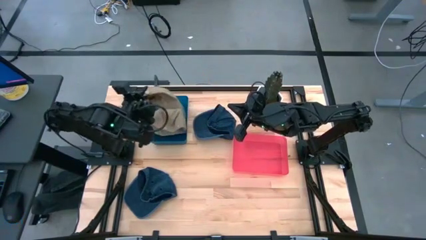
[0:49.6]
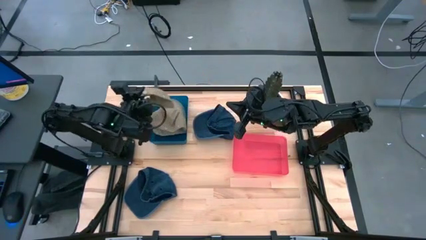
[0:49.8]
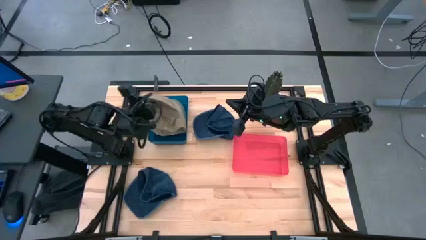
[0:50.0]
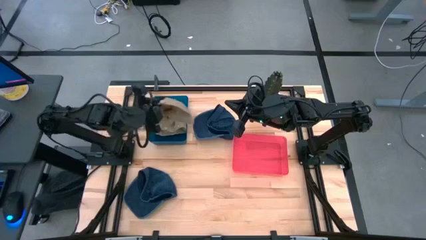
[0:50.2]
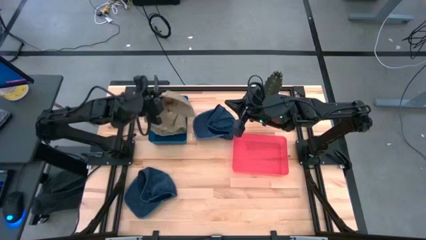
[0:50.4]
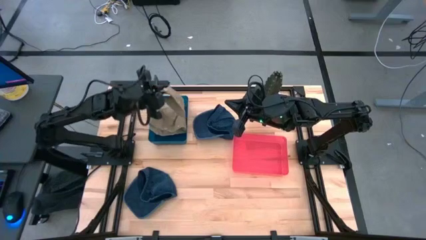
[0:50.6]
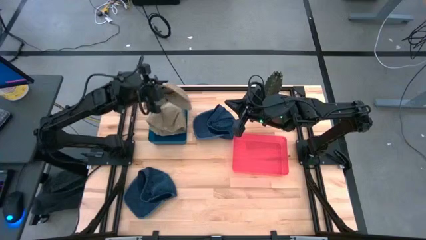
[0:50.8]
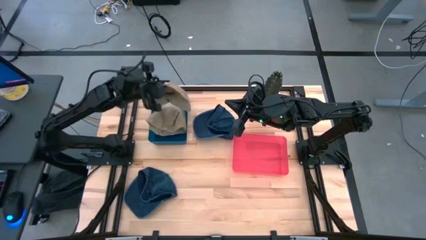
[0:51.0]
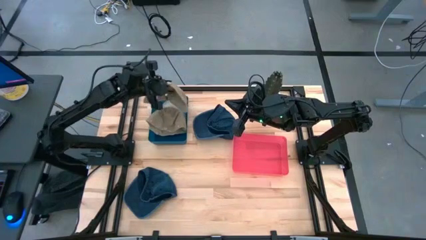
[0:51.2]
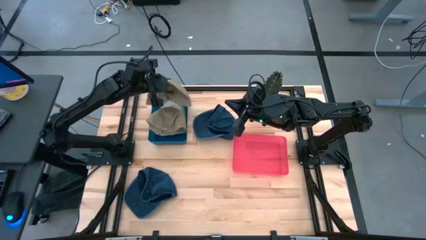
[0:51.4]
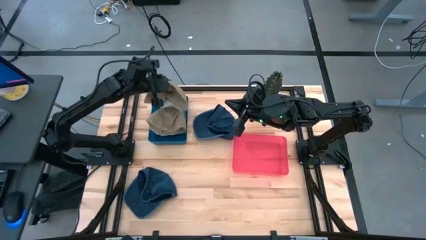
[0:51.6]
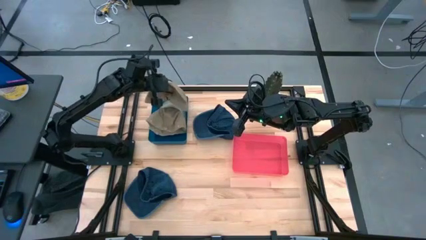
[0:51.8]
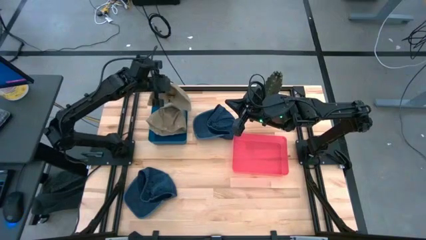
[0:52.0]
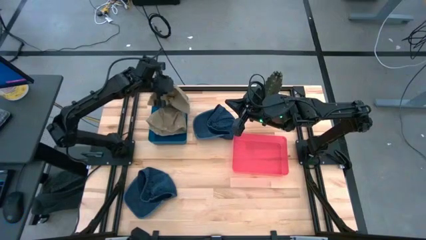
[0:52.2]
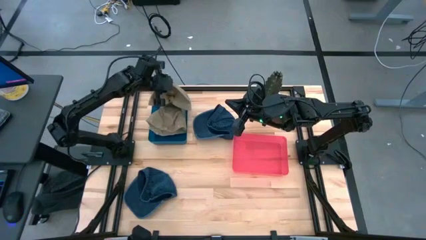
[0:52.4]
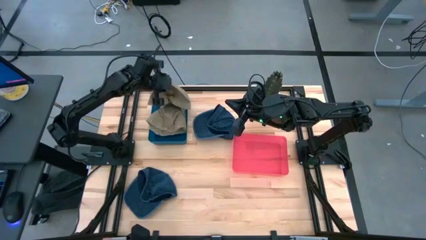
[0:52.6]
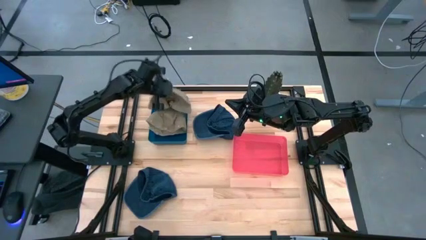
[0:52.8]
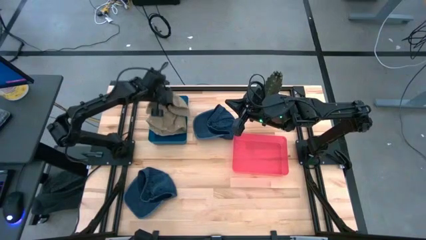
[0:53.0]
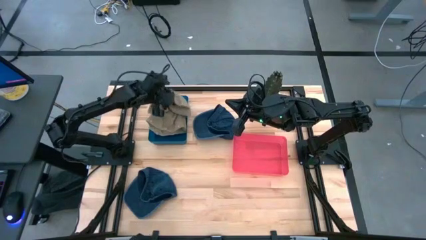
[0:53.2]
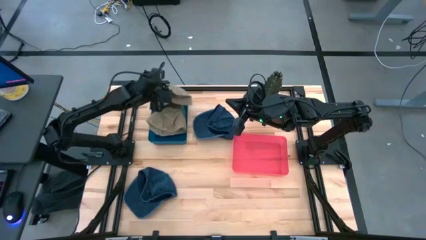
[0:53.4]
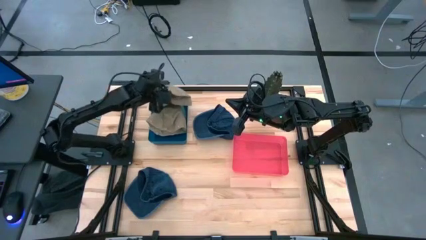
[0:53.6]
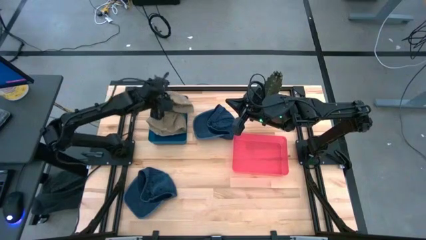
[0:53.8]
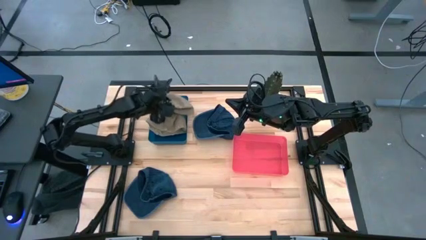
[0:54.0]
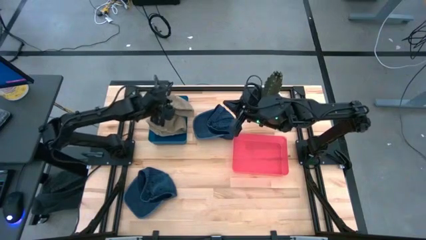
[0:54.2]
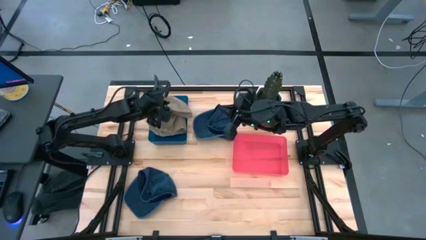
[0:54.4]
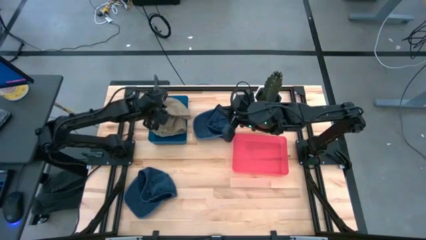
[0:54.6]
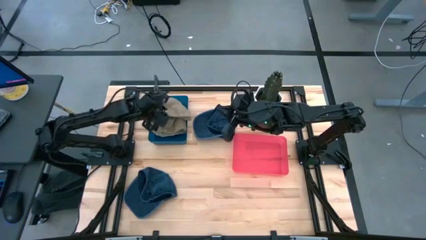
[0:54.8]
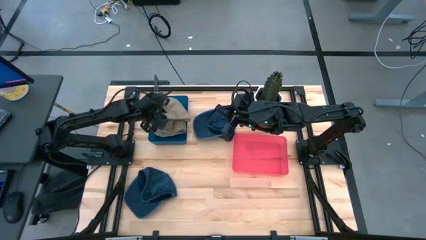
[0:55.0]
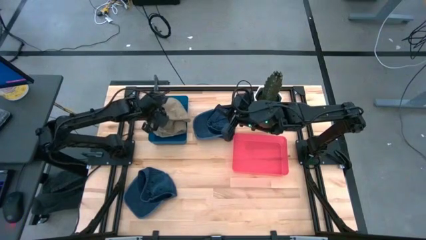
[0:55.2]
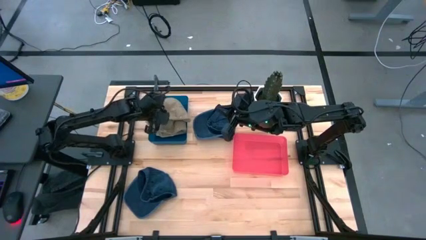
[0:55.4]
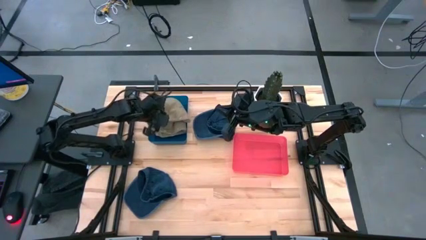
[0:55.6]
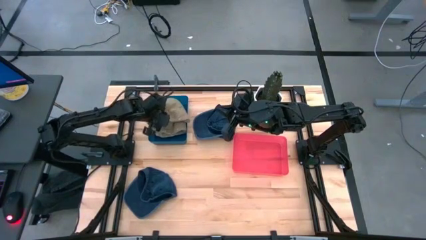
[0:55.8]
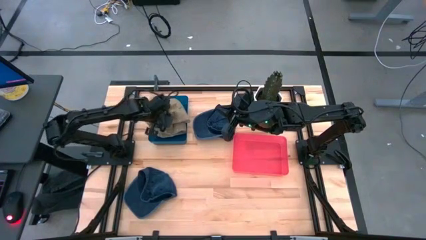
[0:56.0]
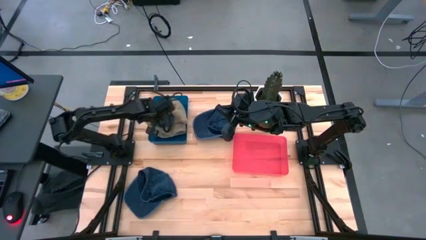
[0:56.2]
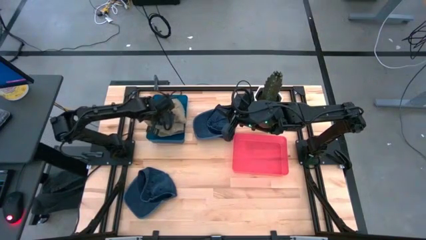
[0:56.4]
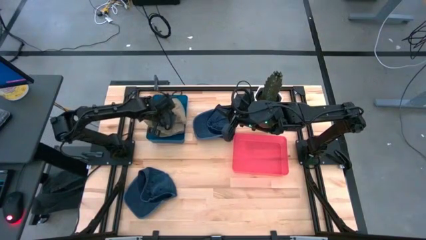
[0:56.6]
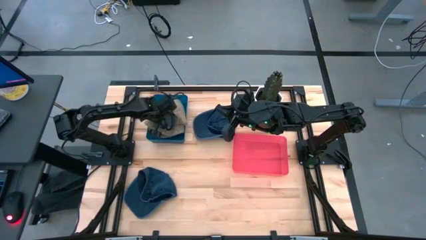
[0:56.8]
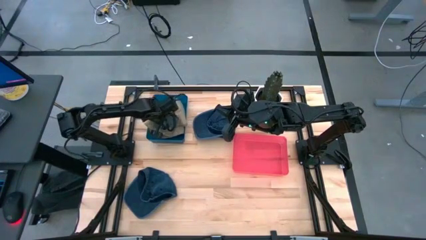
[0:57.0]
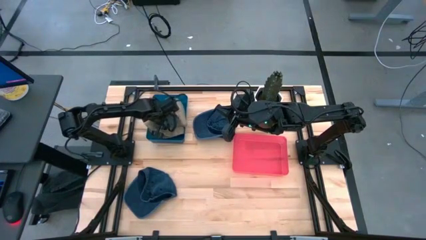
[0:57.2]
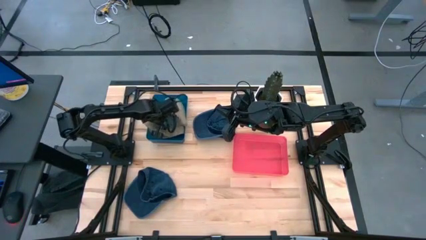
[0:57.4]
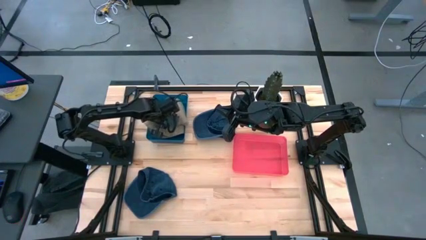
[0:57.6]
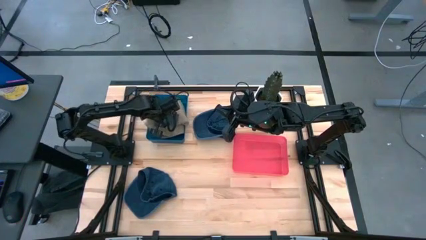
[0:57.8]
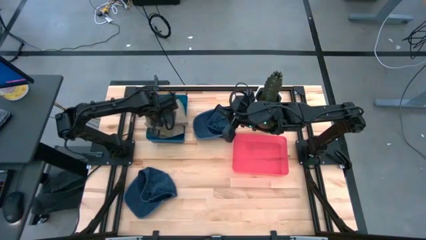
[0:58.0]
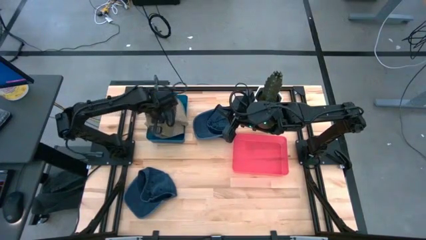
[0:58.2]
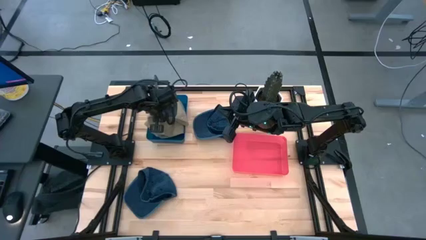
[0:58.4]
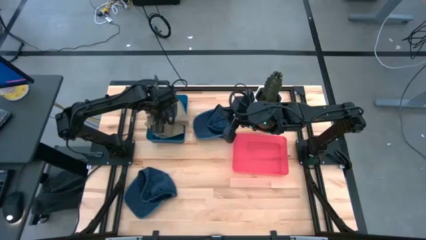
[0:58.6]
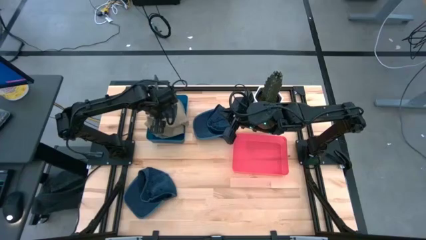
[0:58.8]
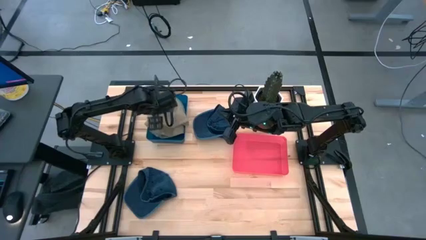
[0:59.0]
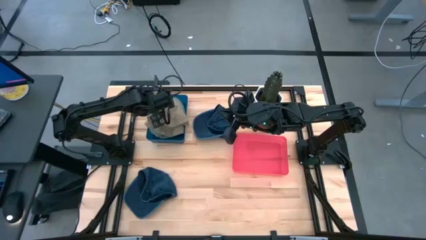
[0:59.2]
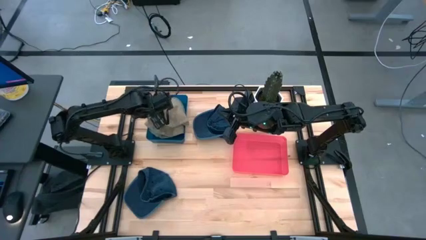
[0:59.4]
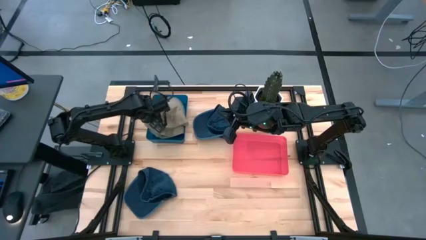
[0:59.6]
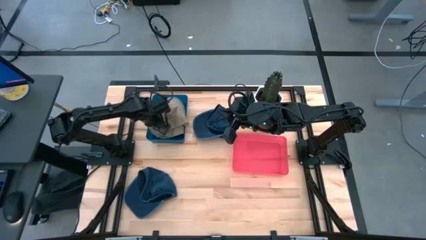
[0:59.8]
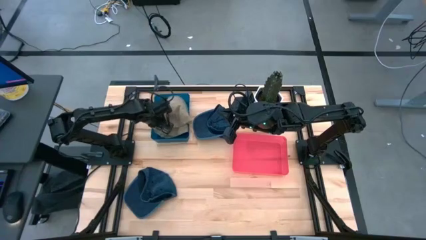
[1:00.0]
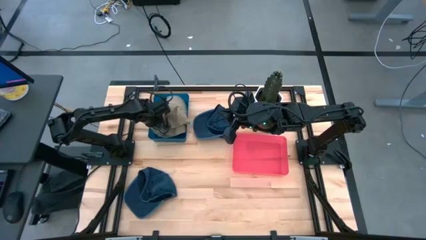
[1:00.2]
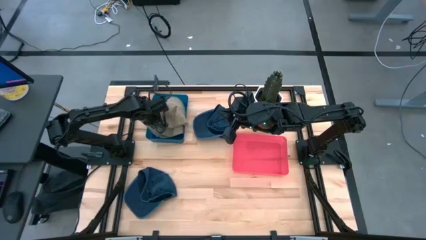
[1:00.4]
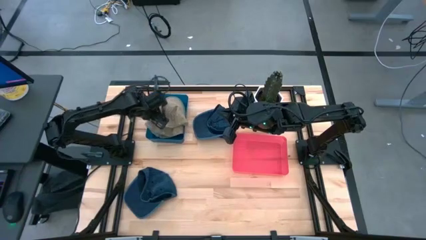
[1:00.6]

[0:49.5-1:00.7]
Task: Pick & Place hat
Put the brown cap into the blue bin
